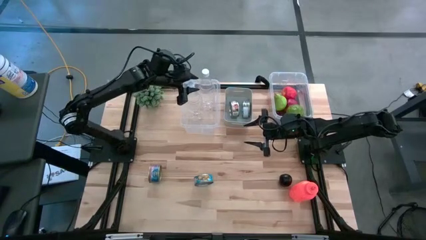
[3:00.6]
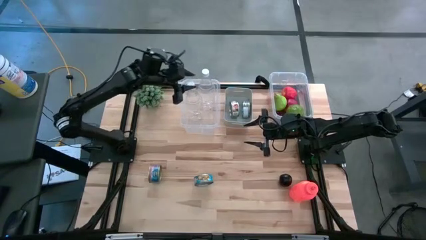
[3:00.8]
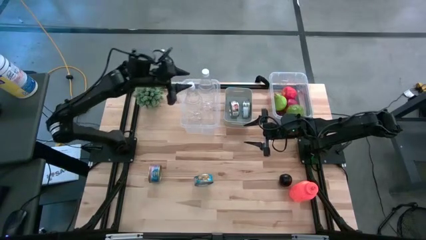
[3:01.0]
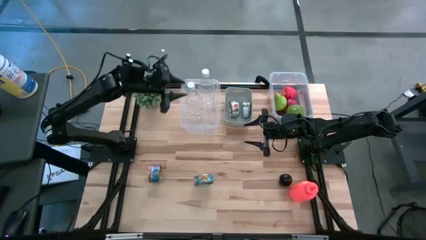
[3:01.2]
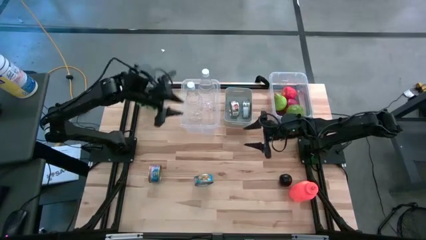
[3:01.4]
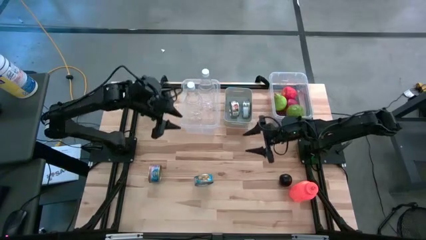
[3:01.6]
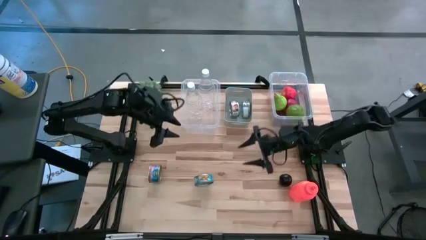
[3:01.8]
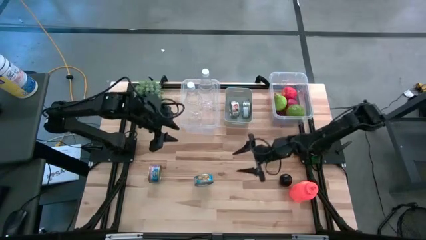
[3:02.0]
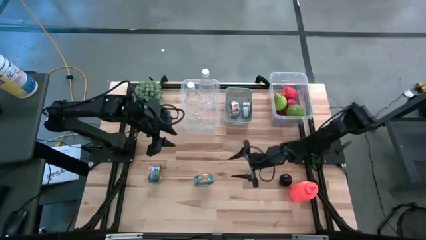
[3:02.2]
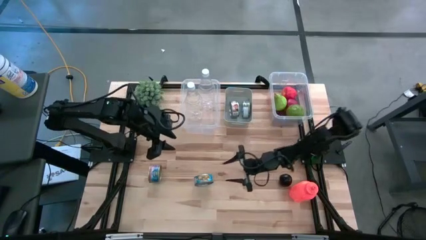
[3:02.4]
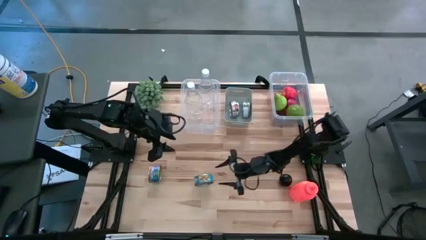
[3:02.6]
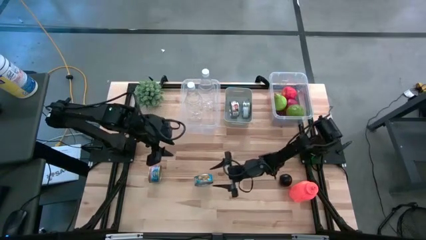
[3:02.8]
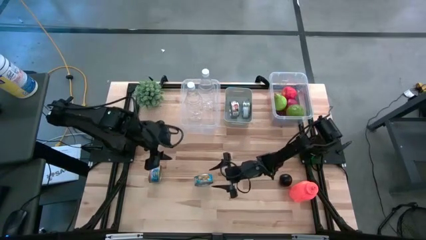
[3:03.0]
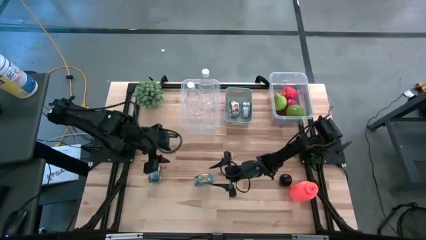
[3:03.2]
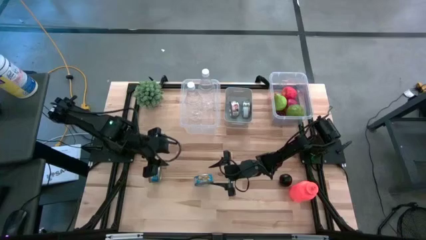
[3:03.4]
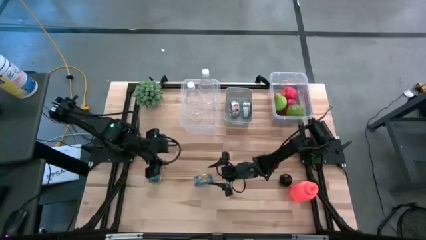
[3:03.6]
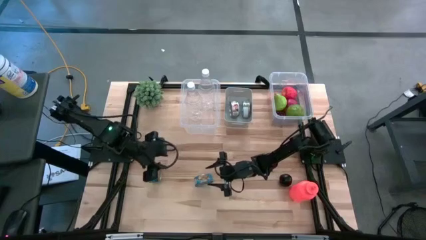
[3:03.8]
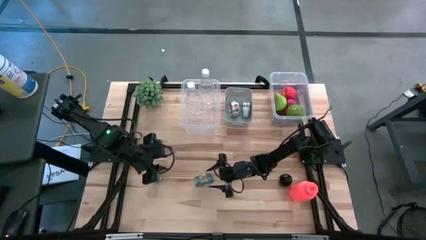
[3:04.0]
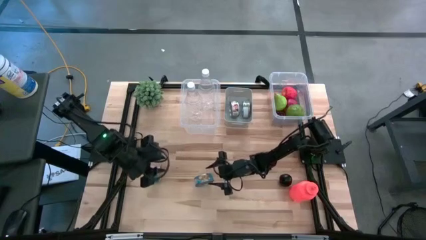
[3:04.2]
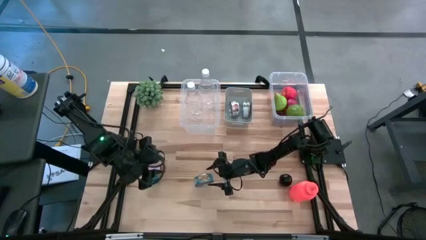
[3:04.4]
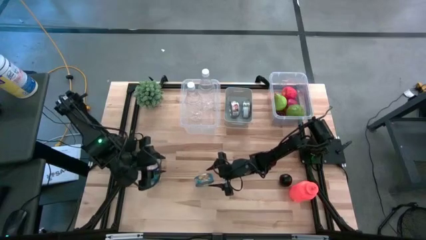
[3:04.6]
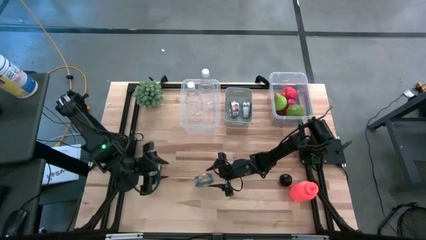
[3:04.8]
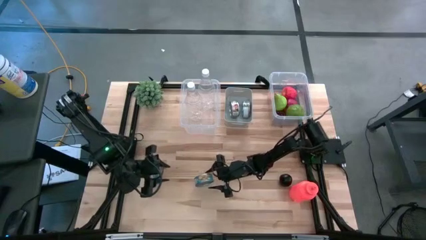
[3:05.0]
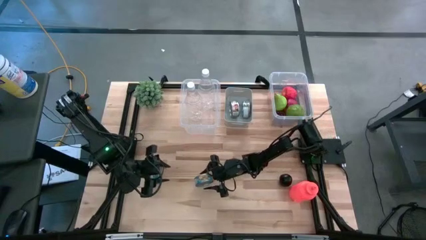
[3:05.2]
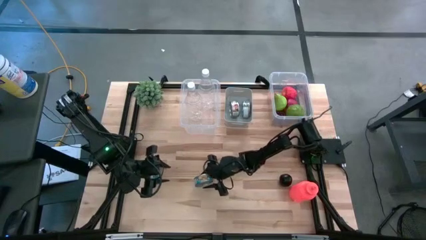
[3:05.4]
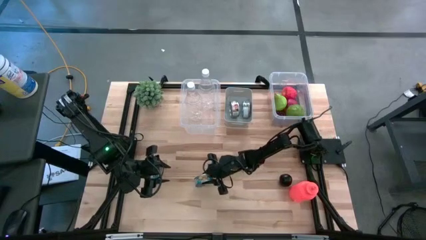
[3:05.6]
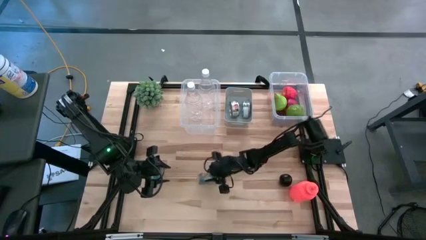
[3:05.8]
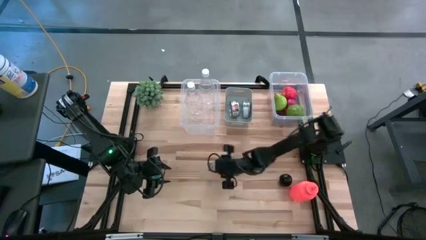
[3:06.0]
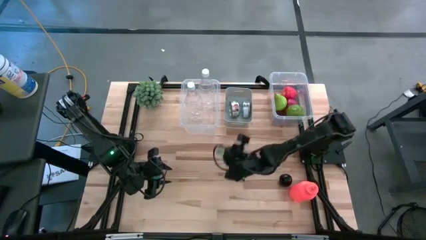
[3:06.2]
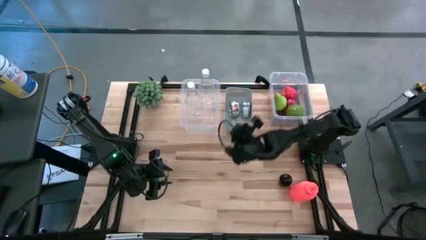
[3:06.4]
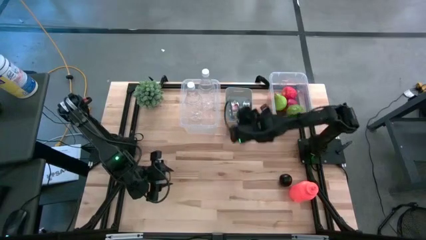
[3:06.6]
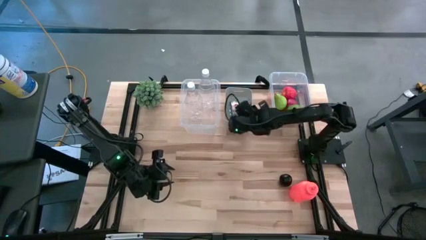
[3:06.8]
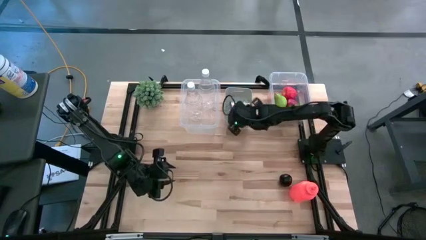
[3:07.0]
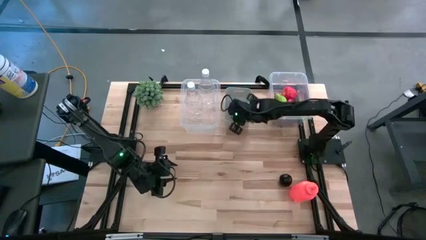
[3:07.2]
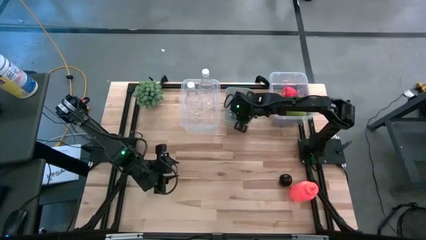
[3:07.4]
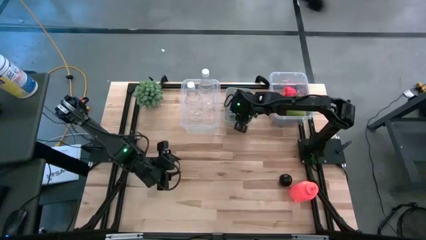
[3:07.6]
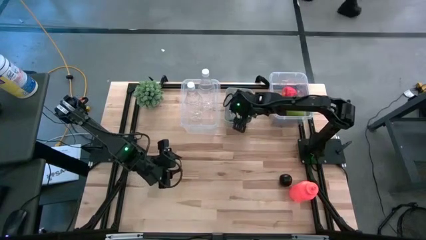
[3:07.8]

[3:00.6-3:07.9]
Task: Pick & Place Food Item
Put the yellow tuna can into the gray bin

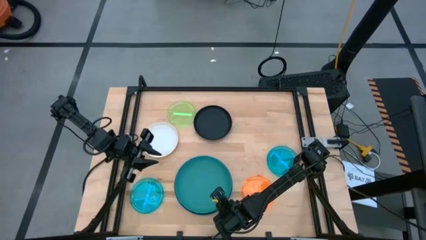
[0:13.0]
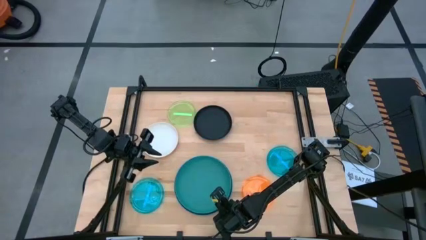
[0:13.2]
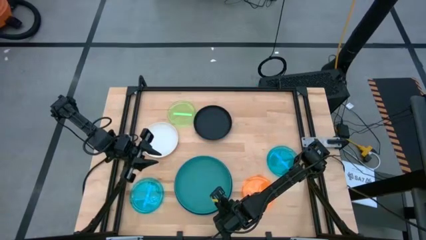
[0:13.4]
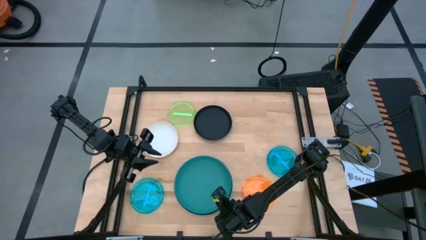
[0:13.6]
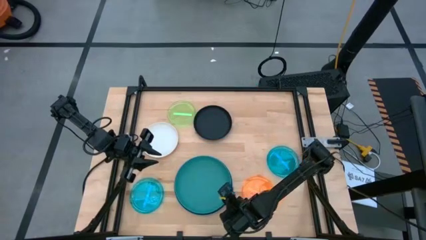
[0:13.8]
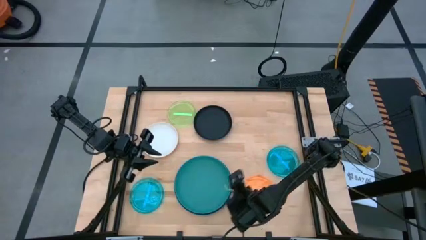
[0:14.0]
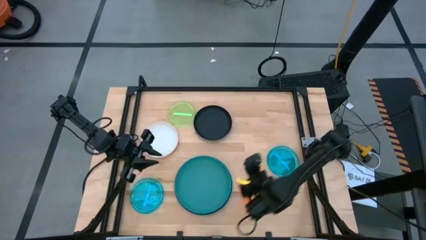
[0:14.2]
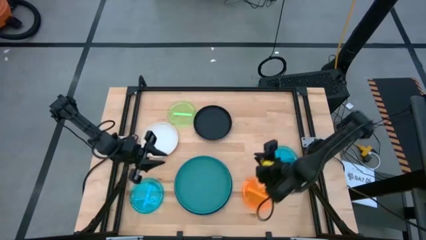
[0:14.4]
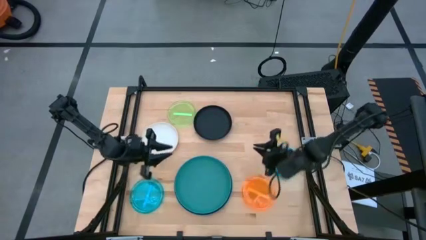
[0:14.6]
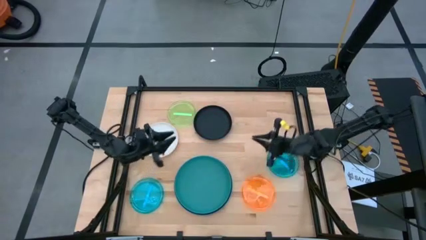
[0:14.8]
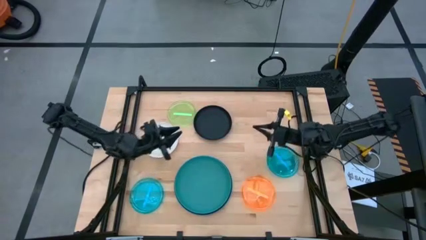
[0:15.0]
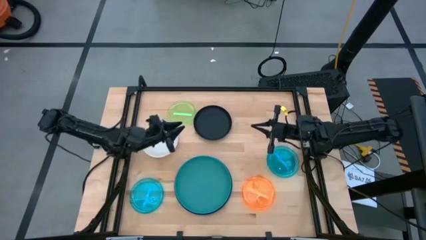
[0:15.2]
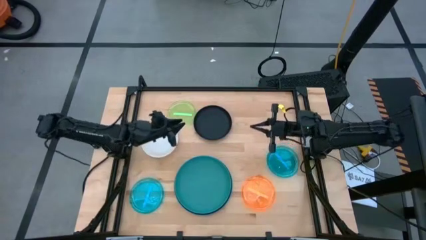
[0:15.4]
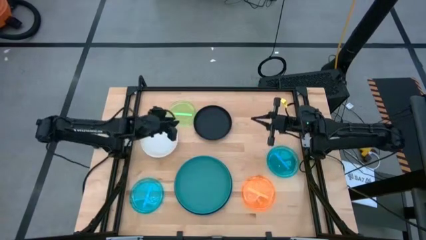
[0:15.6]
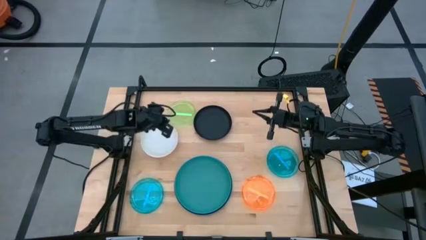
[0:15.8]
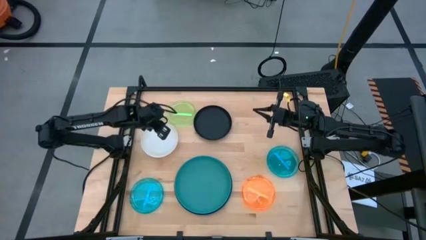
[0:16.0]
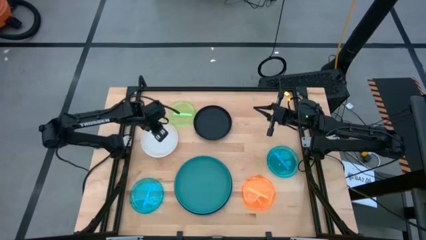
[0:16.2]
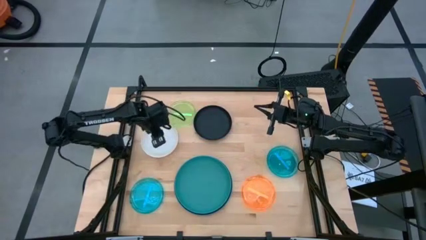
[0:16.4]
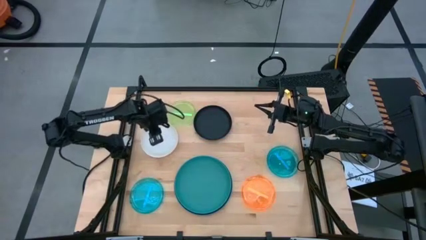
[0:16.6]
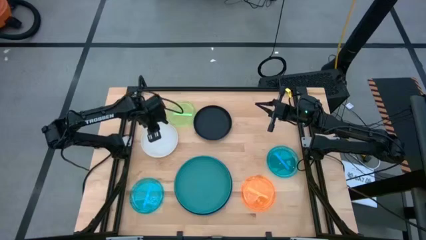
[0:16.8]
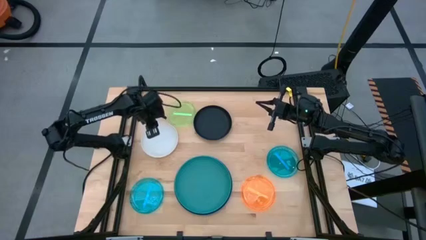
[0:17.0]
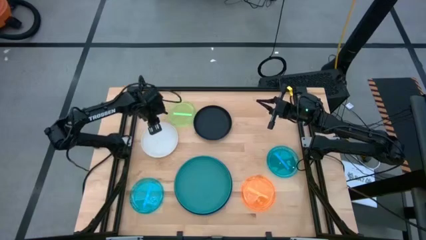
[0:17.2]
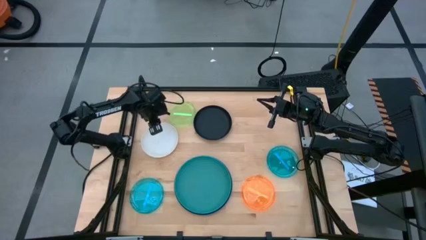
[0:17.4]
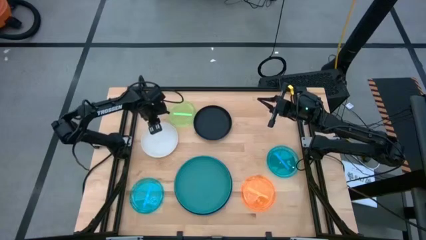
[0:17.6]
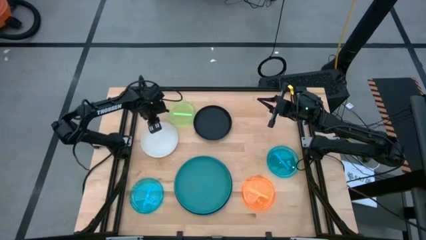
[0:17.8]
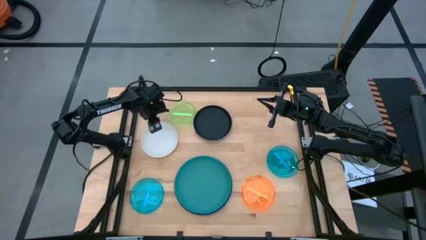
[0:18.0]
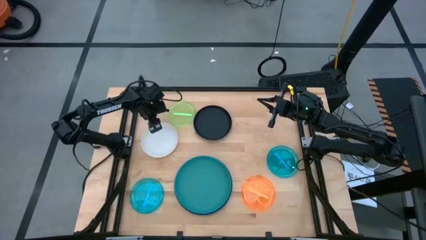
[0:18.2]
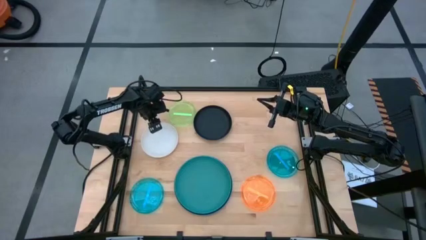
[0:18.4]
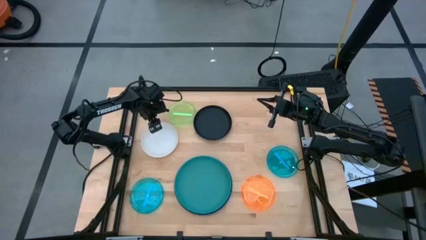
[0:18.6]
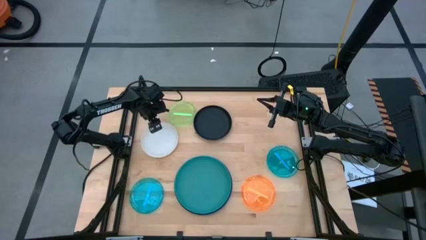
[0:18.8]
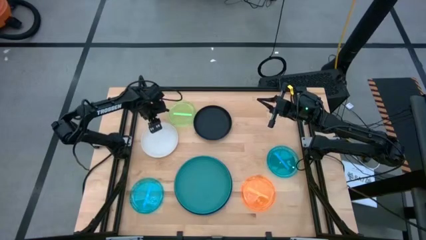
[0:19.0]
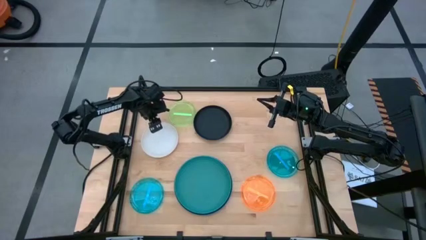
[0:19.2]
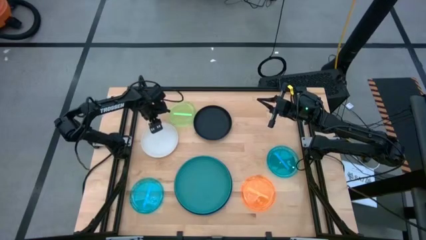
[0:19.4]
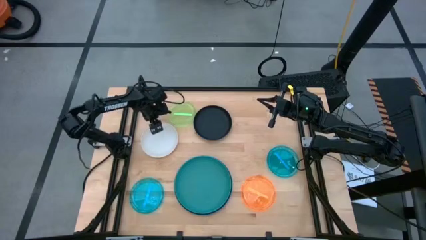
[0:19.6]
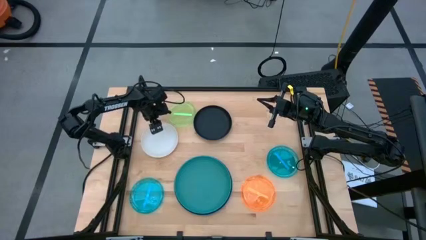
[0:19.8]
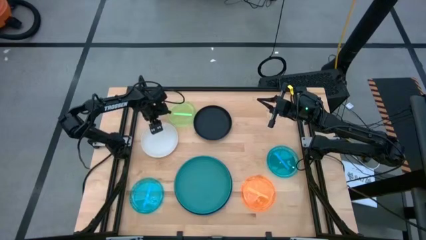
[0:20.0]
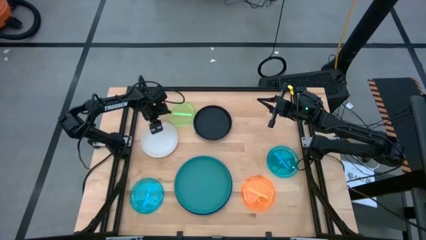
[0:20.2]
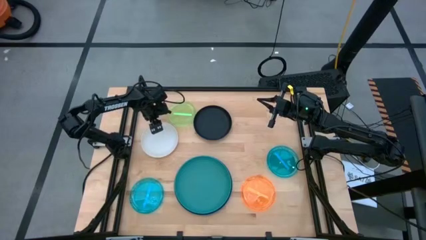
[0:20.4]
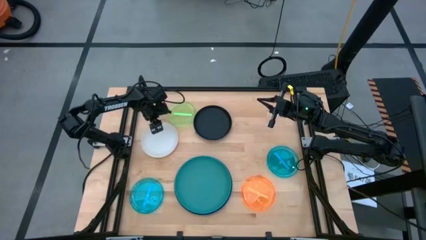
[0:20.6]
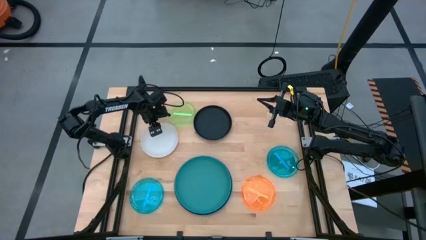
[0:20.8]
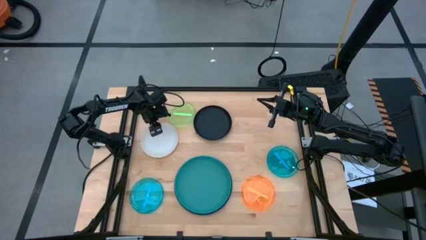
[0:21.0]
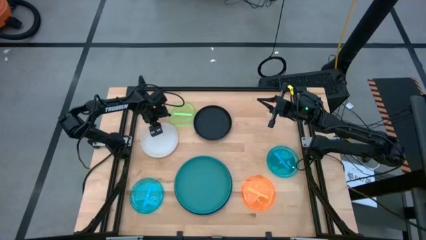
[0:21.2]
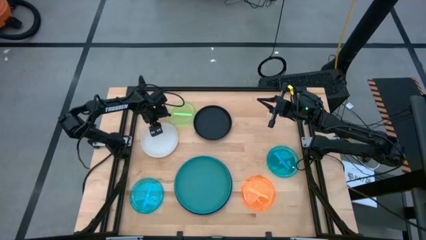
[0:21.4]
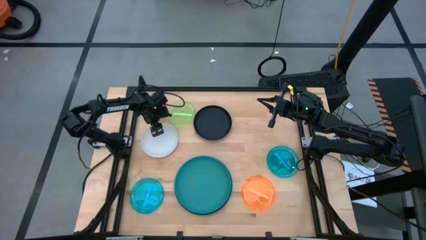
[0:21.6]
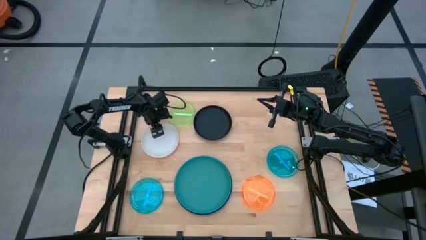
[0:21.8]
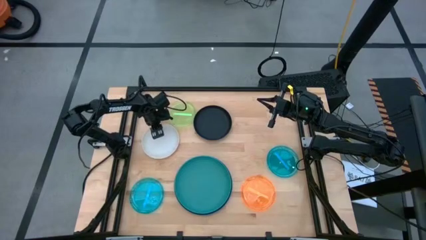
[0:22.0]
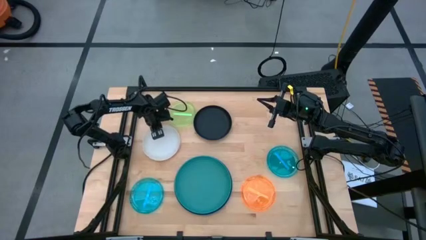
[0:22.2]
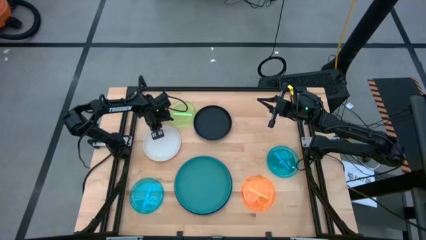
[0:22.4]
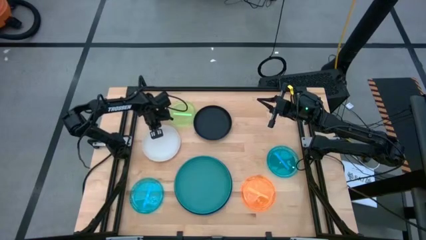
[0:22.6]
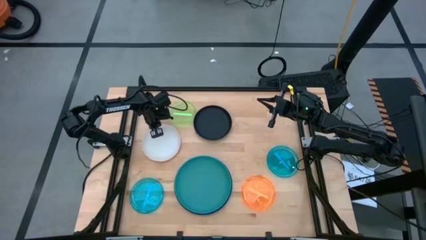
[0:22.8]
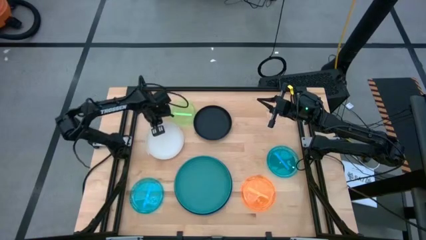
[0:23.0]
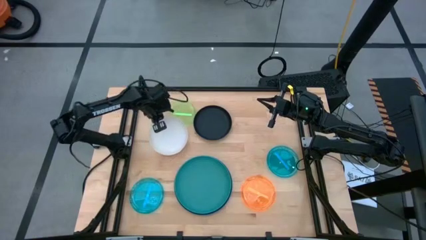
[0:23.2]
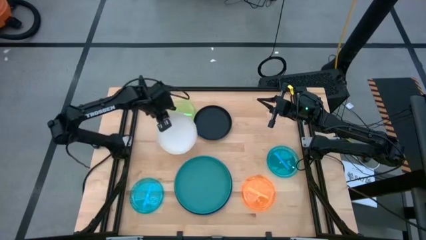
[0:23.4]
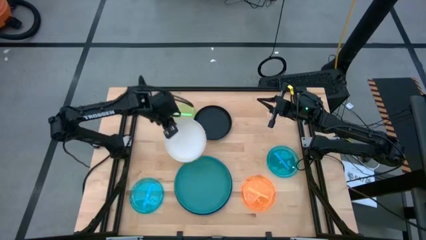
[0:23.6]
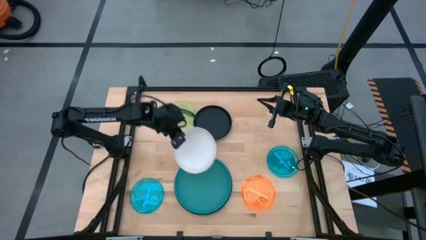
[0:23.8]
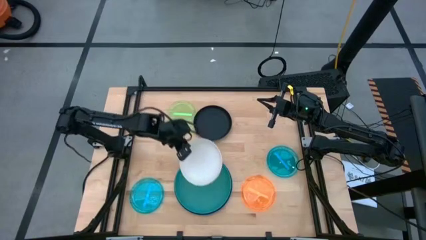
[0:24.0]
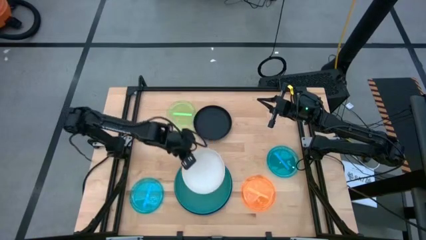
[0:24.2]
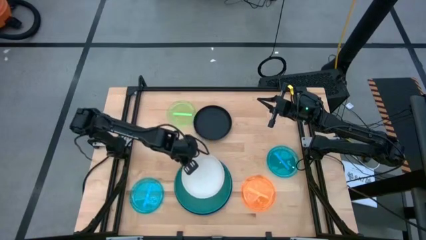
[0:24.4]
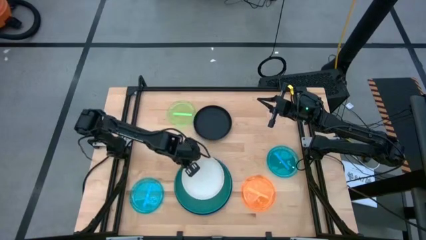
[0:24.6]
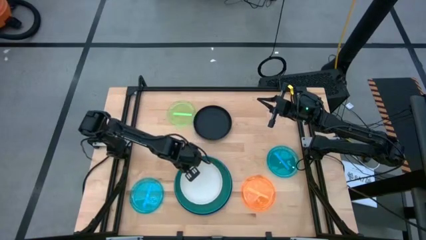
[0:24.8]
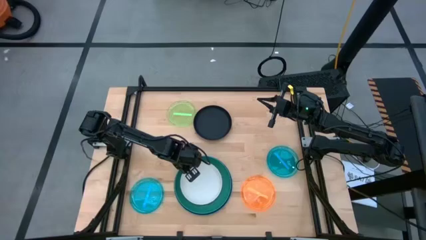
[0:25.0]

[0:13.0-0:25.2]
Task: Stack plastic plates
Stack the white plate on top of the dark blue plate
